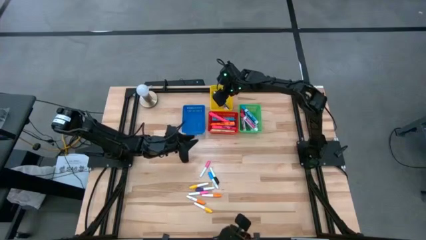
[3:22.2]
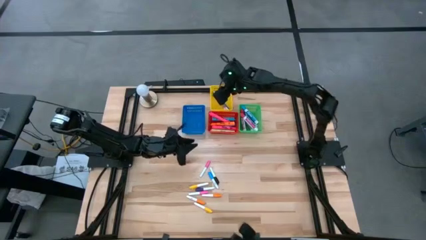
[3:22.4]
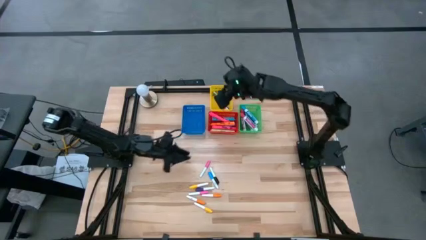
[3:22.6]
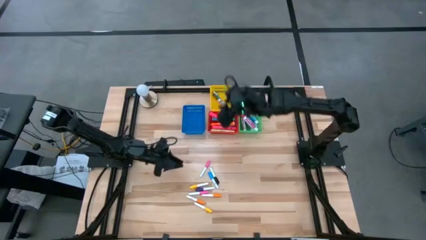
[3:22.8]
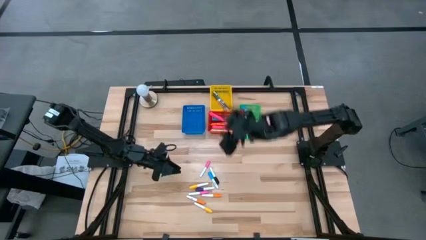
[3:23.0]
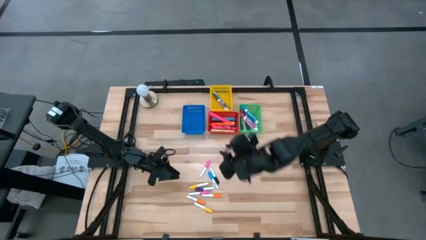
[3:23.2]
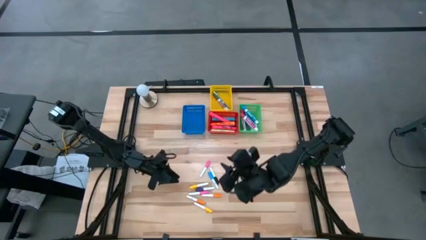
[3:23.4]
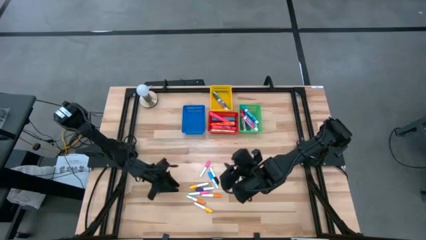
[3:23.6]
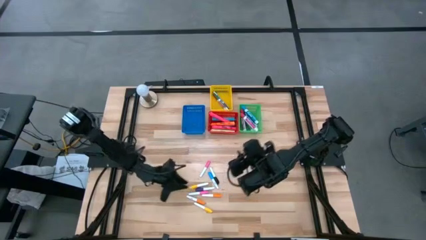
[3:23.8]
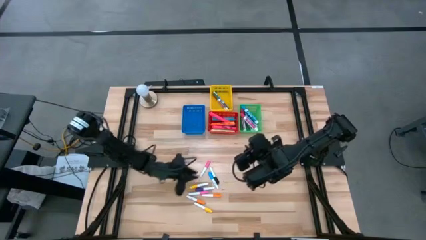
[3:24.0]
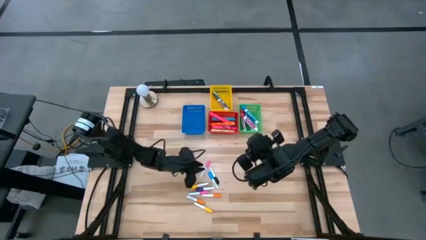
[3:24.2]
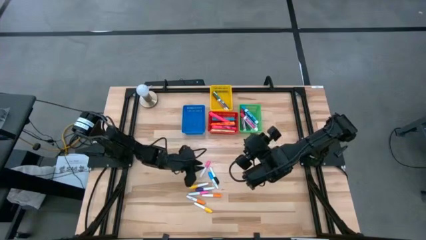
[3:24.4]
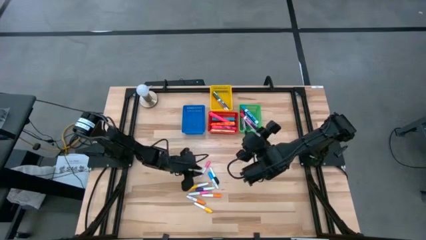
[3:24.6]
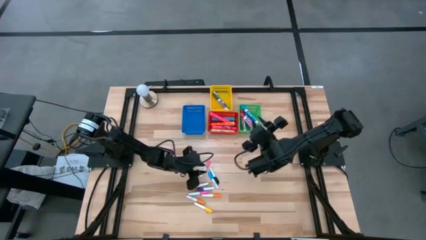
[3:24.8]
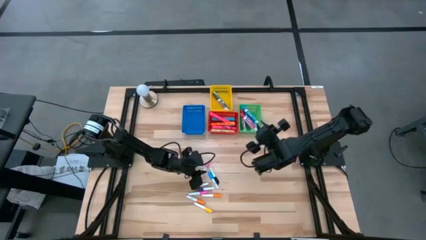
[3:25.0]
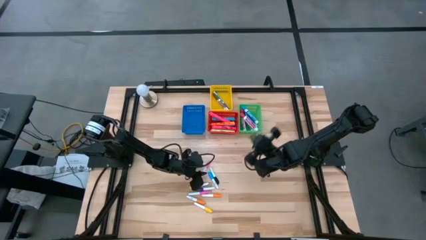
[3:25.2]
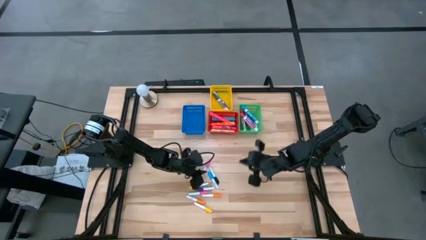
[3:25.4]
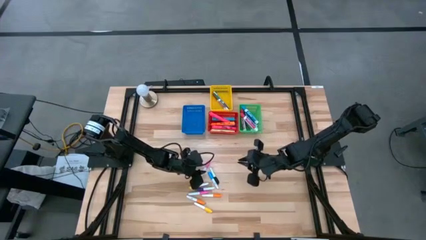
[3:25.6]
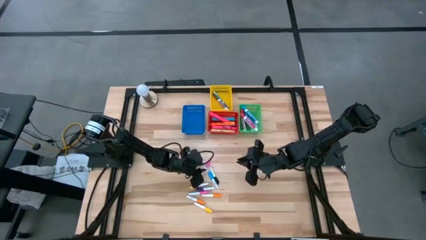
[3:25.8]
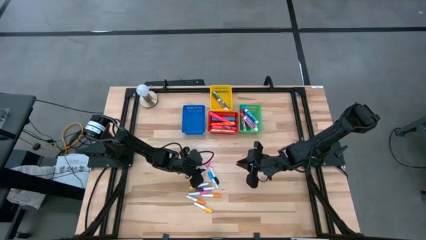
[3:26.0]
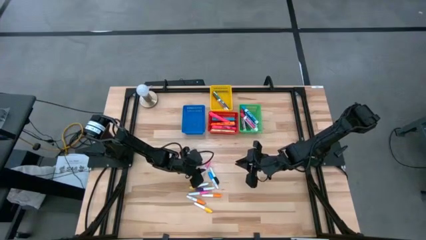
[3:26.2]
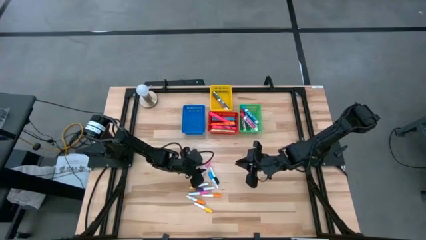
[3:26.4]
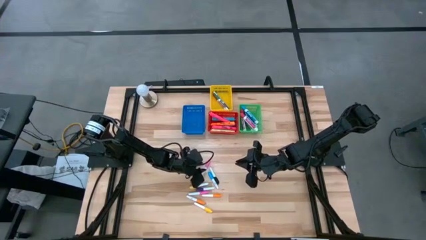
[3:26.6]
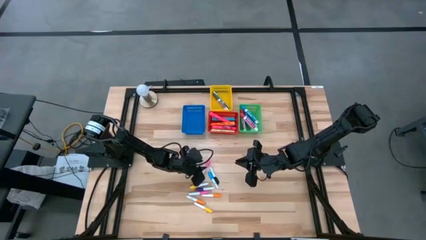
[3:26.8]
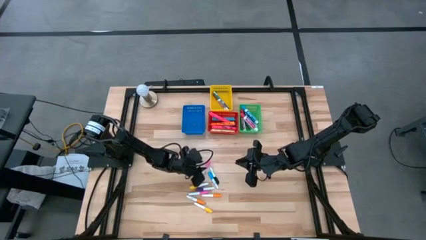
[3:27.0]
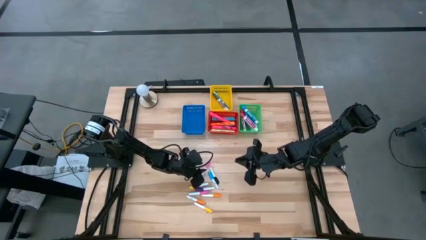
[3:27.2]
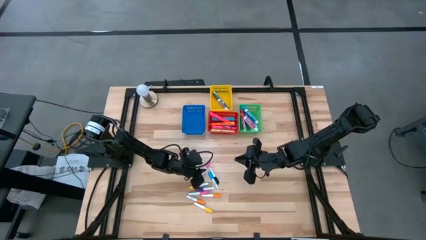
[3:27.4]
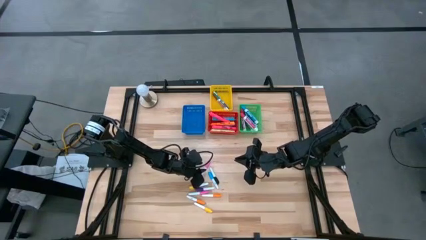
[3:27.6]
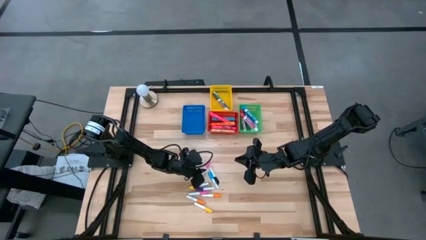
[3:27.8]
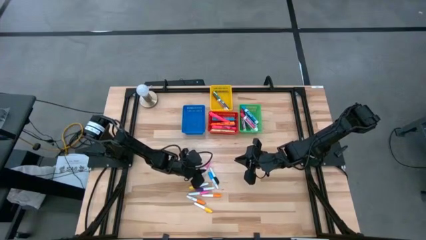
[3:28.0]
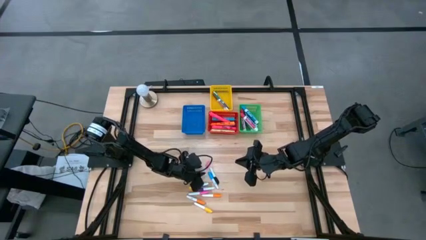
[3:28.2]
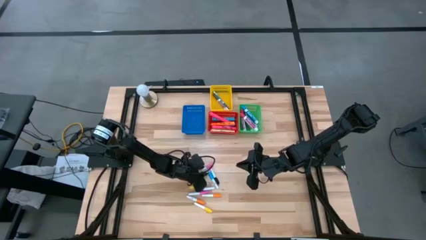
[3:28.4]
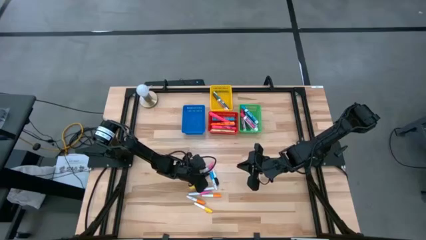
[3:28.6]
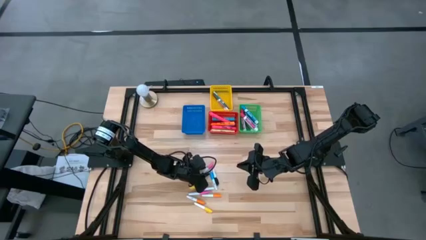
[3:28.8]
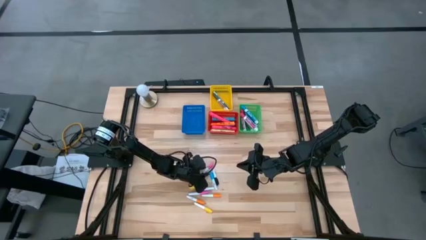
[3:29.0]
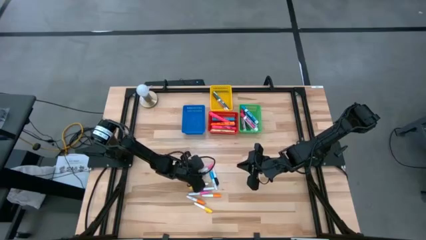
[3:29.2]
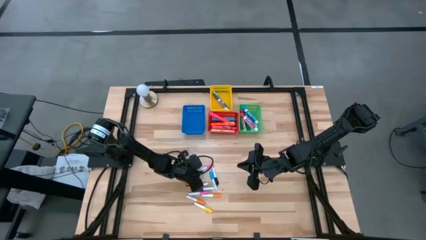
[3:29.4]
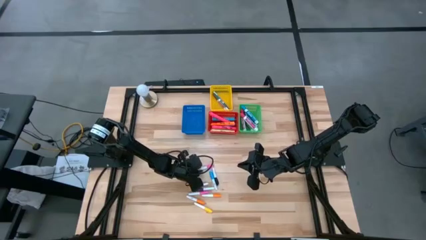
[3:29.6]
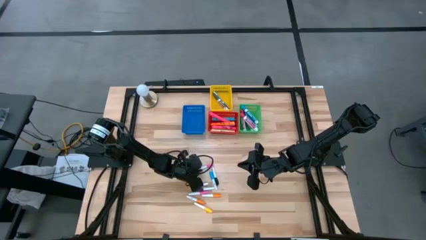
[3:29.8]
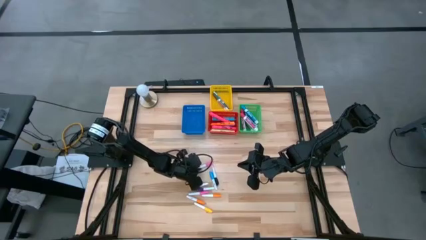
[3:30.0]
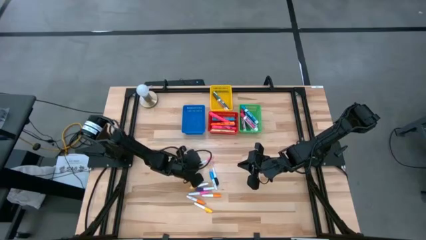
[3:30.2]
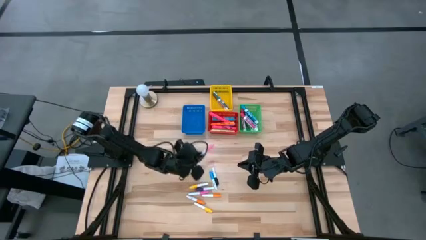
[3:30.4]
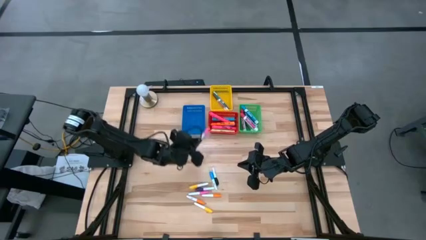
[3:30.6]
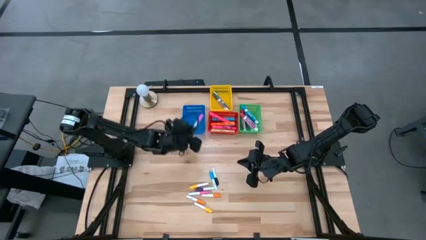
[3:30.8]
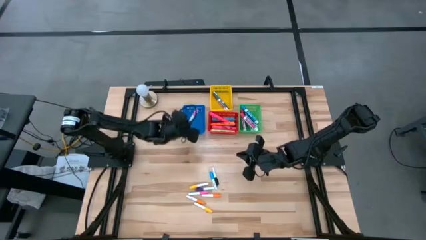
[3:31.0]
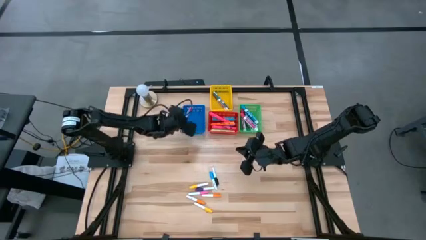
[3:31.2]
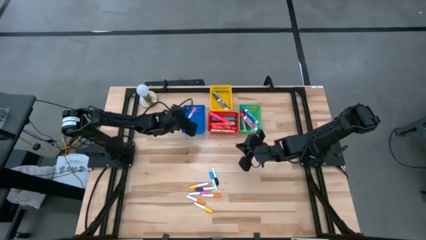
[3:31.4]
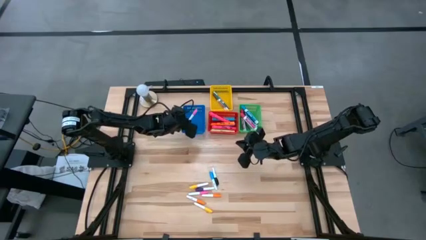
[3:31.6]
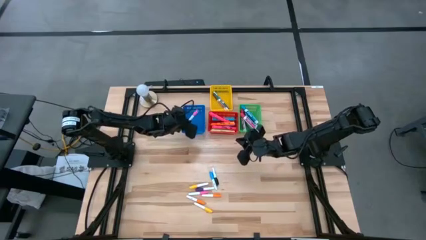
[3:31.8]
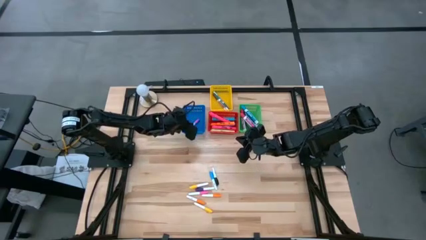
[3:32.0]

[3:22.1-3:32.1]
Task: Pick & Place Markers
Put the top small pink highlighter pen into the blue bin

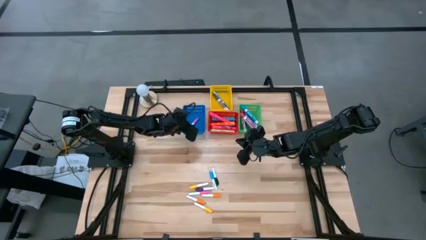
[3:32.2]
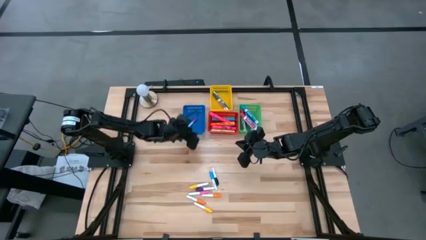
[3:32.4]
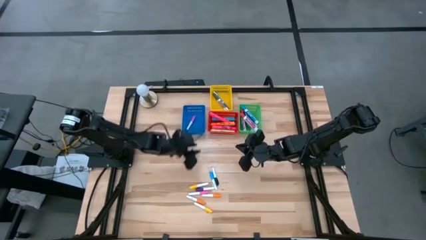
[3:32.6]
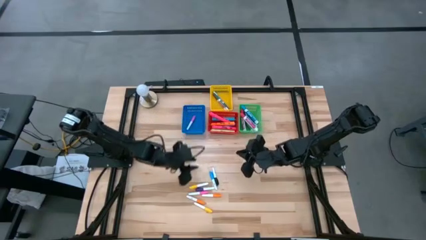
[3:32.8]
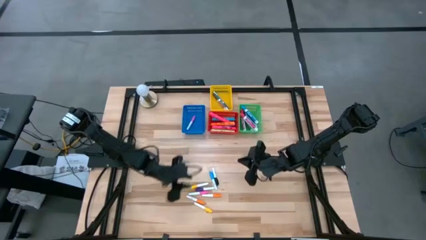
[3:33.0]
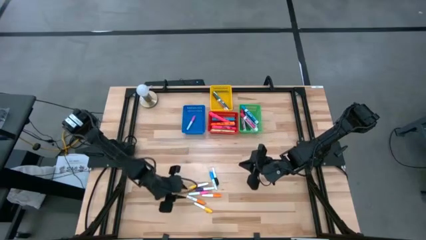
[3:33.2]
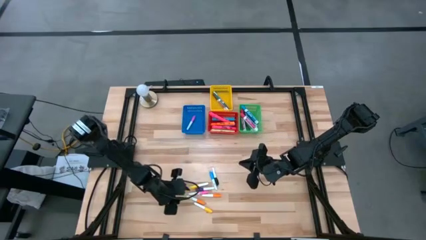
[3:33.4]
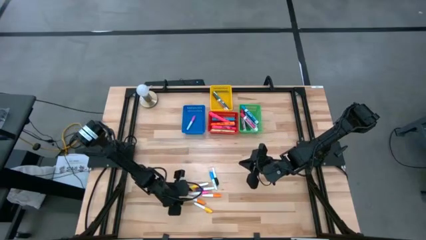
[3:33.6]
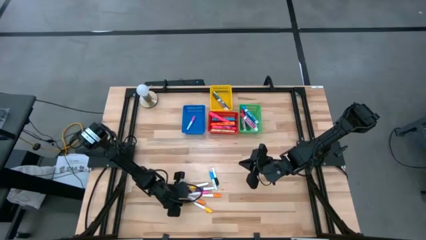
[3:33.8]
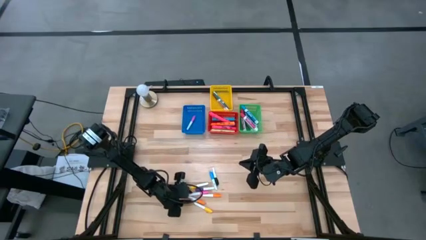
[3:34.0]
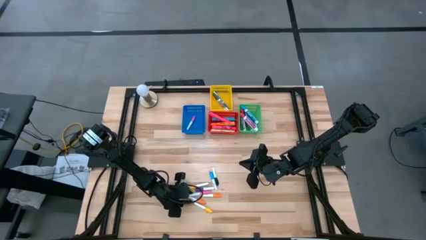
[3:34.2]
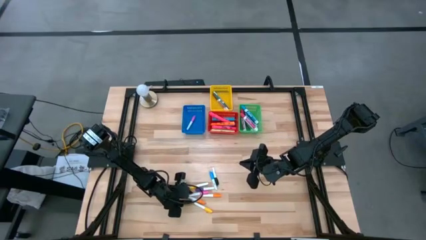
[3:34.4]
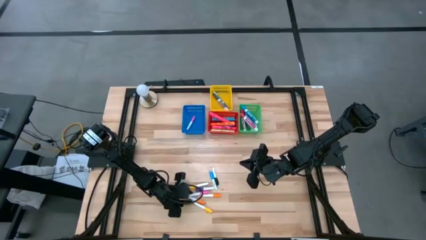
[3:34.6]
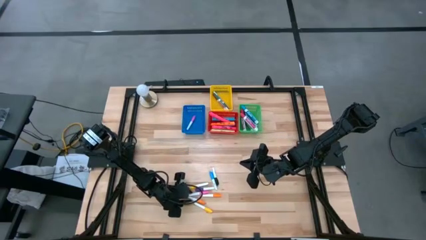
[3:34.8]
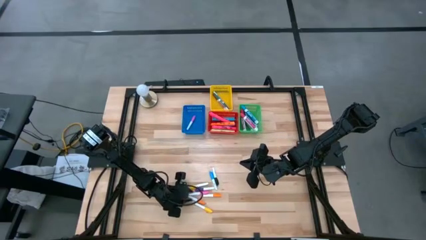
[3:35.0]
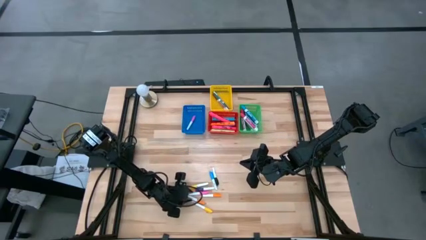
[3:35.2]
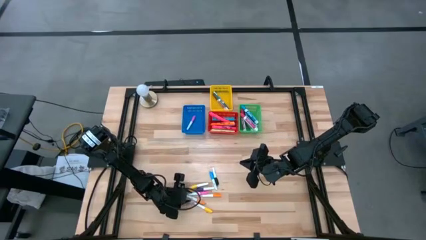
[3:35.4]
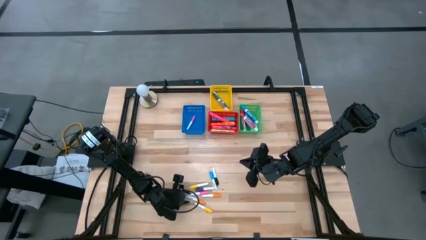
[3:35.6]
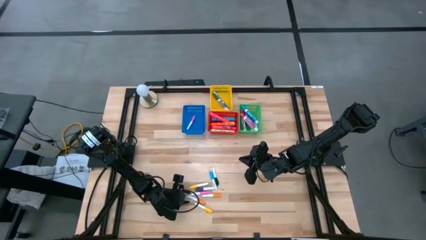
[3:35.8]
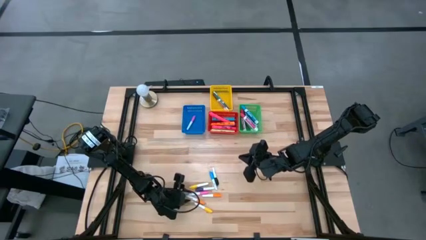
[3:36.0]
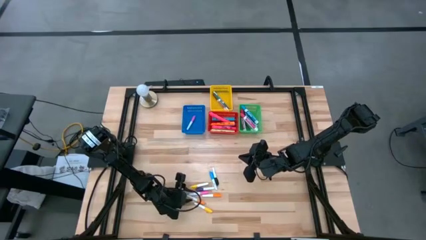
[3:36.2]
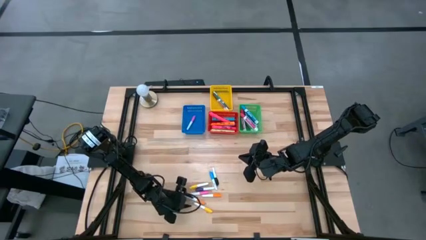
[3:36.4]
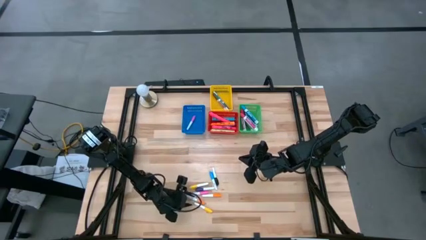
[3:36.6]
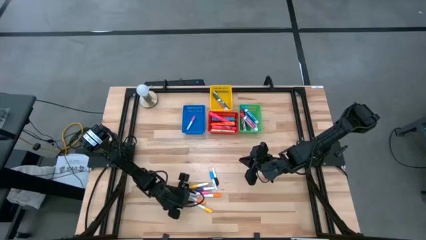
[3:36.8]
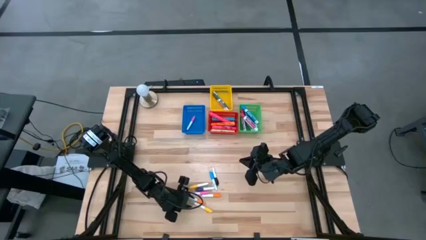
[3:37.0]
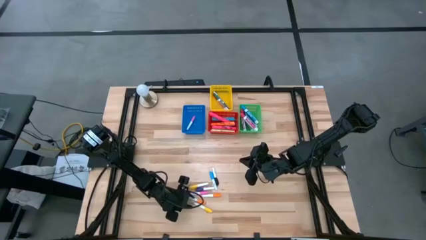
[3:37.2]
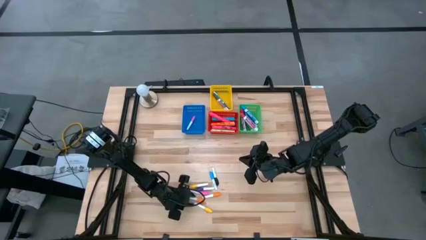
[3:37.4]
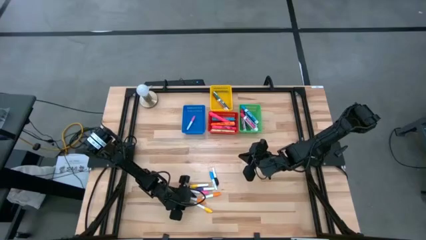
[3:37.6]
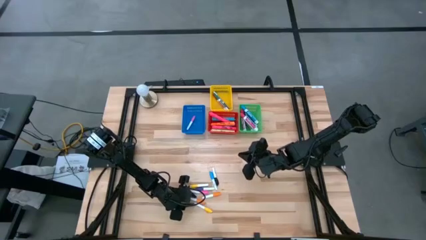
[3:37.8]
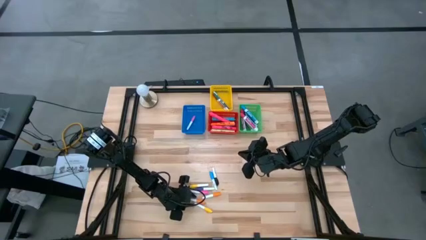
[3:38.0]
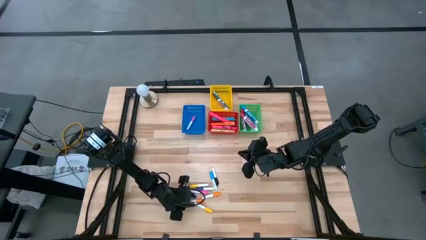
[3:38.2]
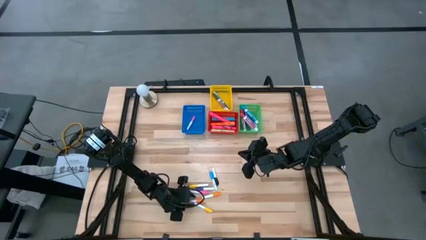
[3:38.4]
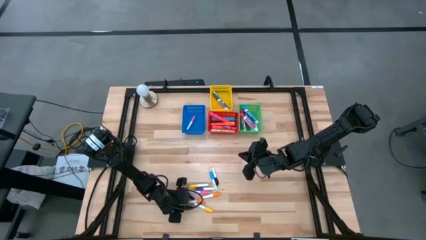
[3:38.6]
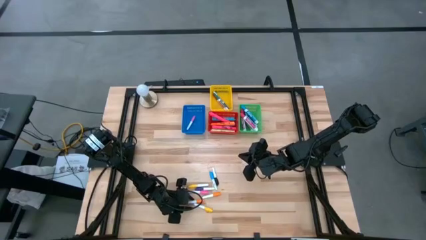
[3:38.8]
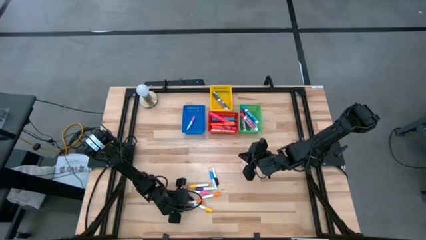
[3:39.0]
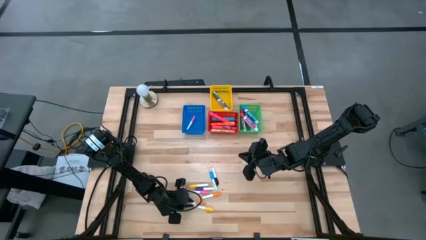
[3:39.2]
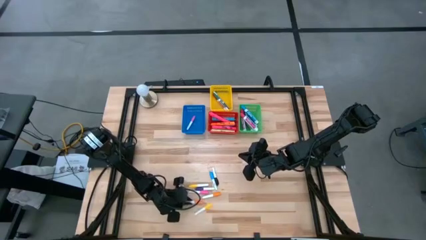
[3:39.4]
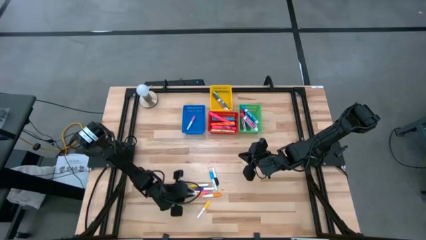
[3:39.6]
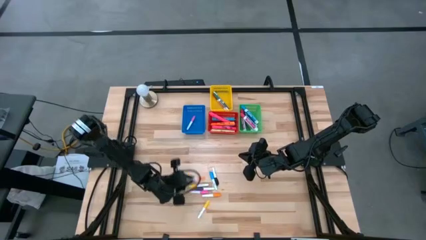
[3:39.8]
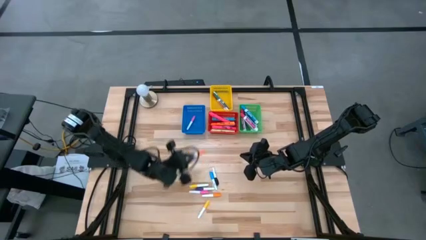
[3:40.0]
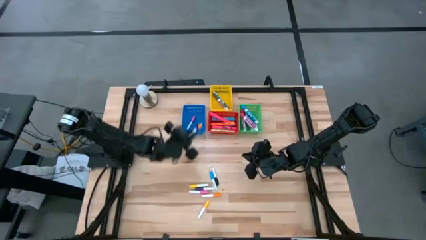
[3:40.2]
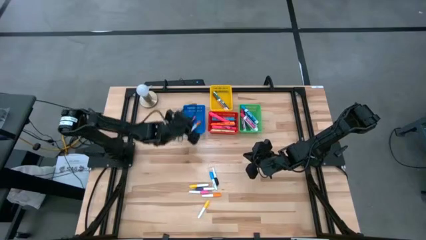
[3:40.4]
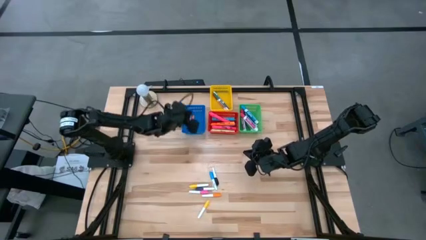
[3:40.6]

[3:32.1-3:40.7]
Put the bottom small orange highlighter pen into the blue bin
